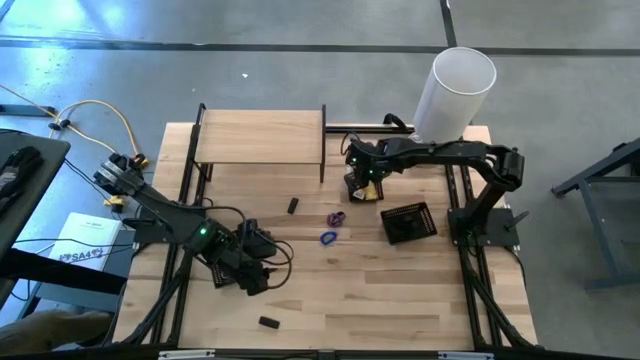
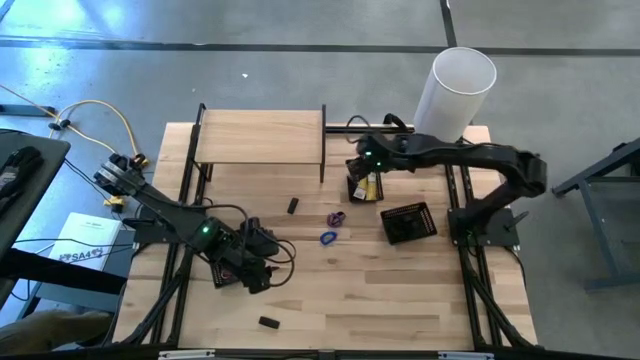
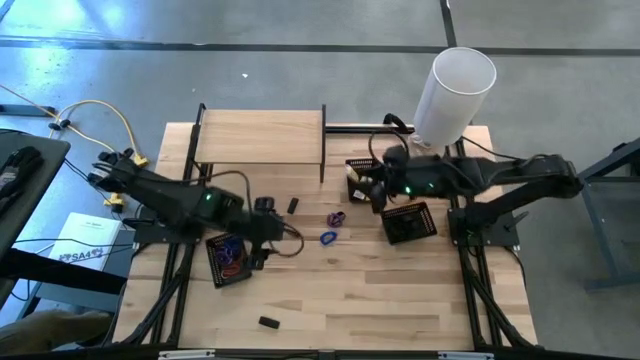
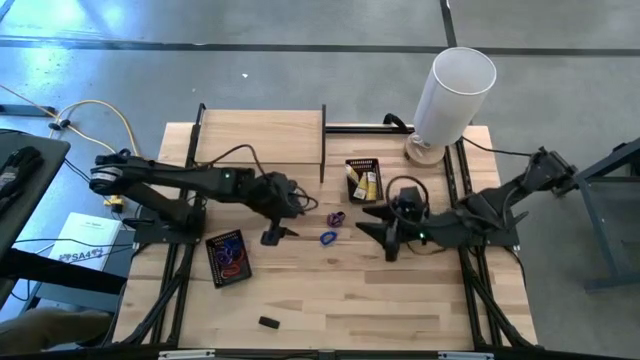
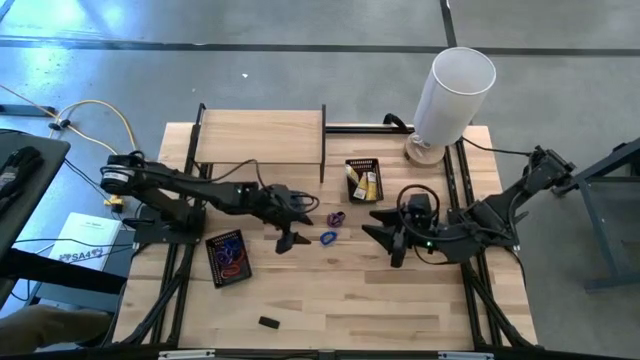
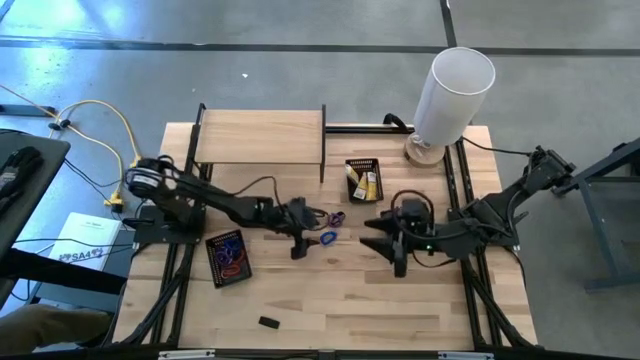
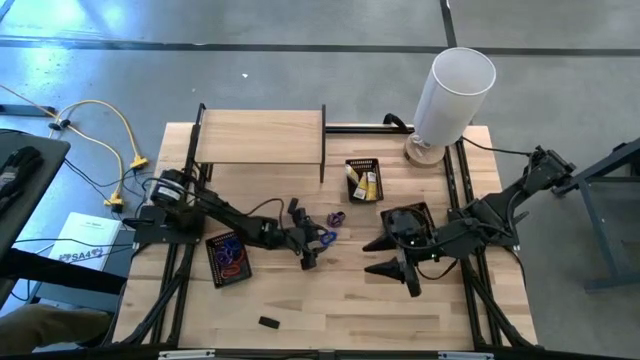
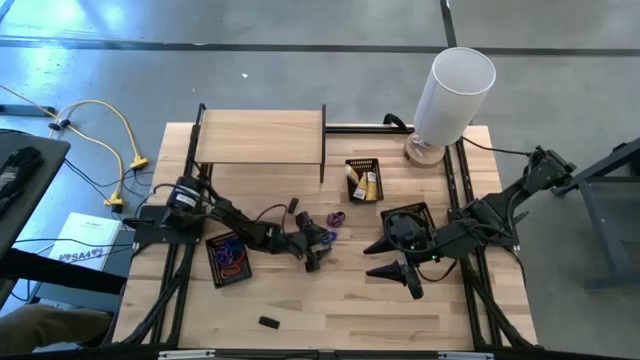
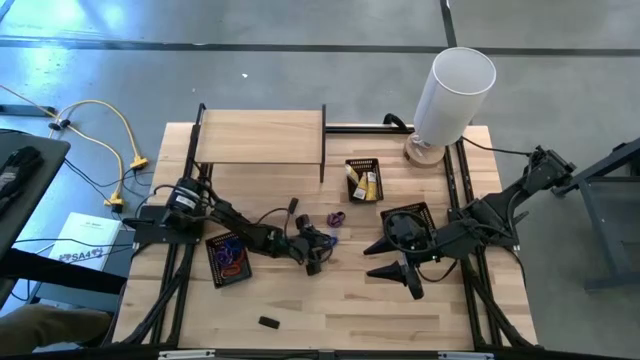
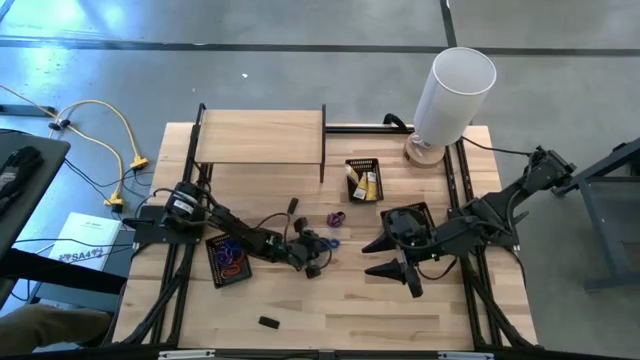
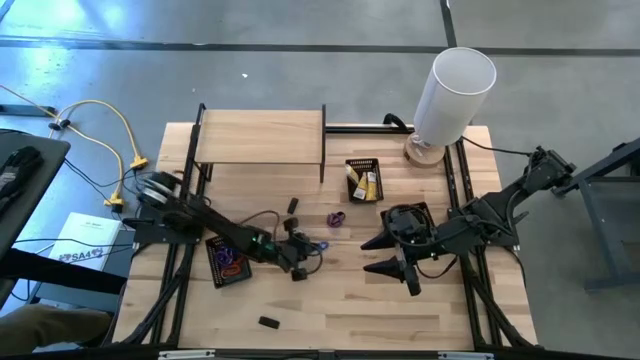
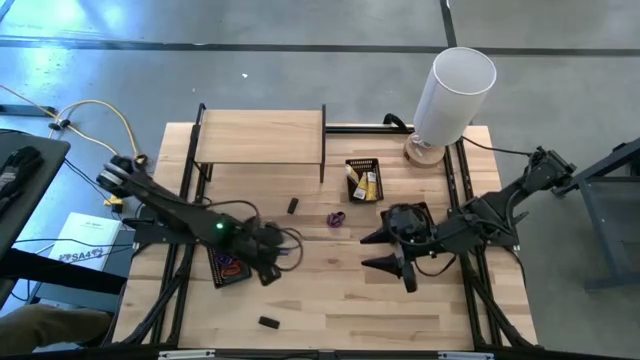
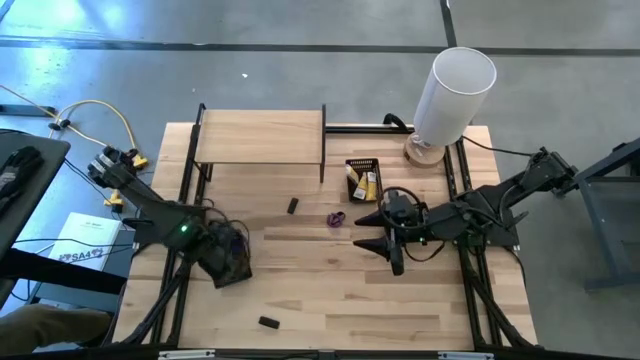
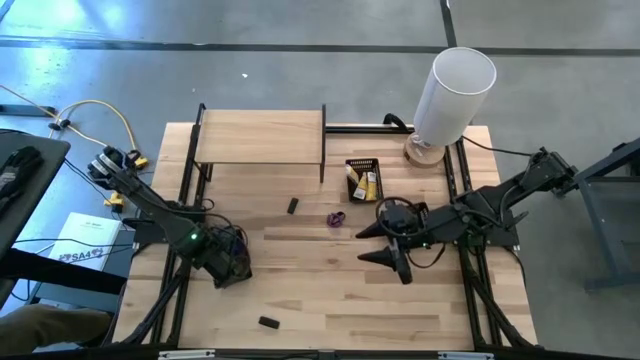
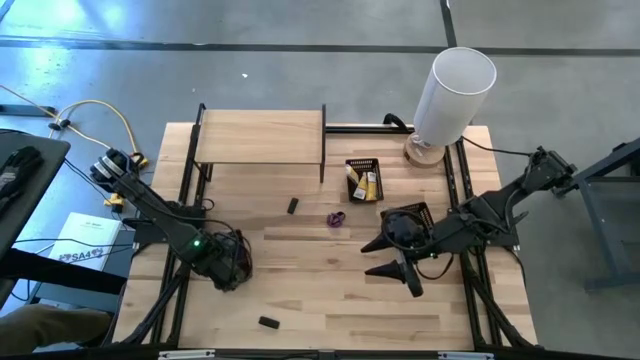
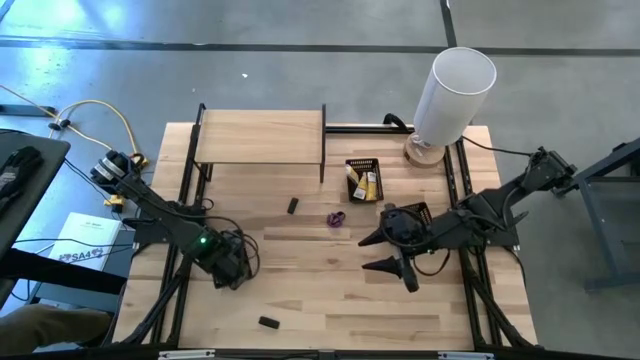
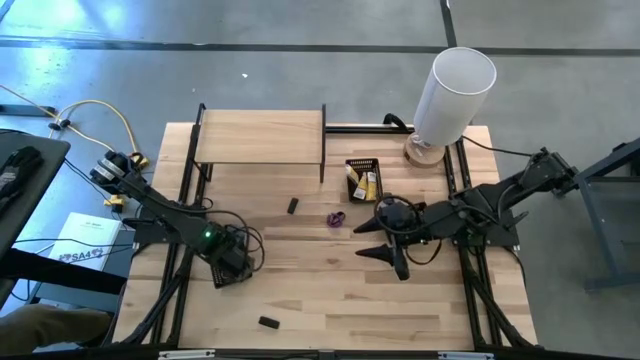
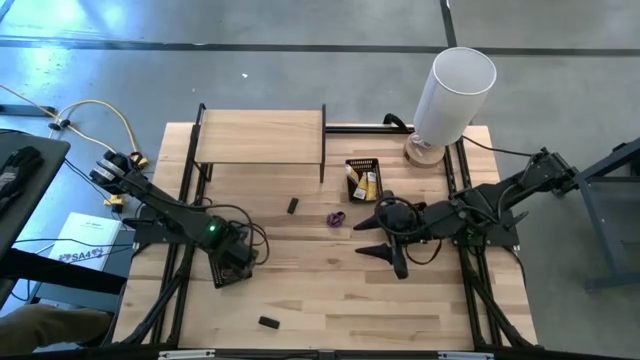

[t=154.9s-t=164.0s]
Task: Pick & Place Office Desk Supplies
Put the blue spring keychain into the bottom left black bin

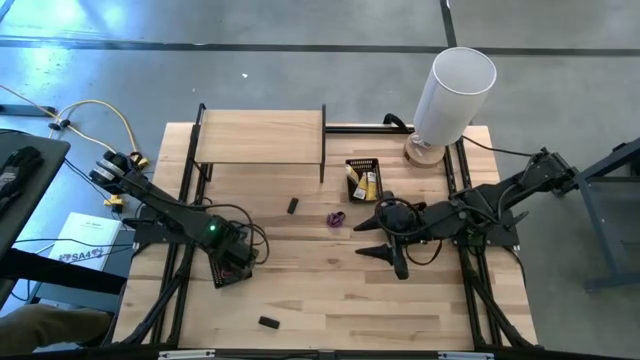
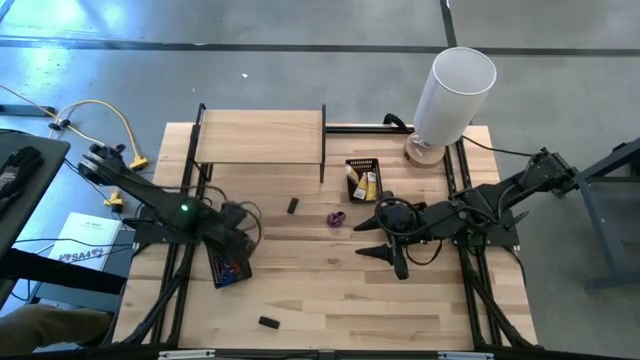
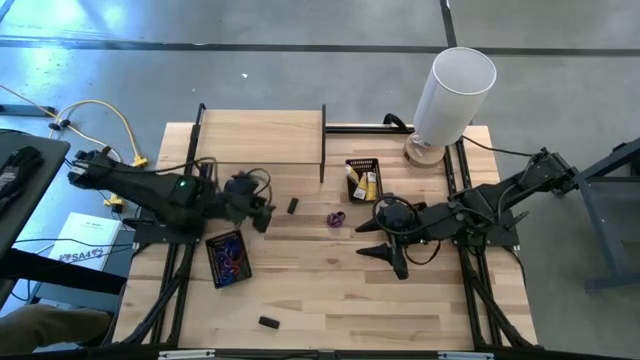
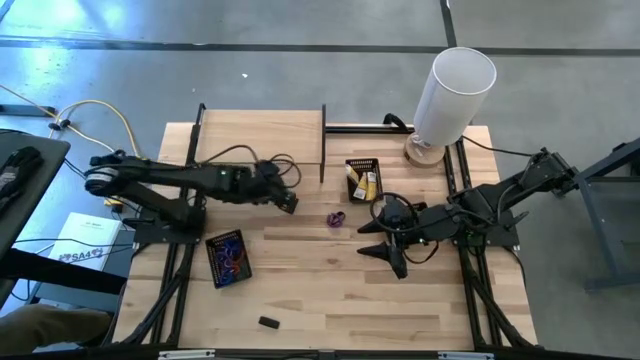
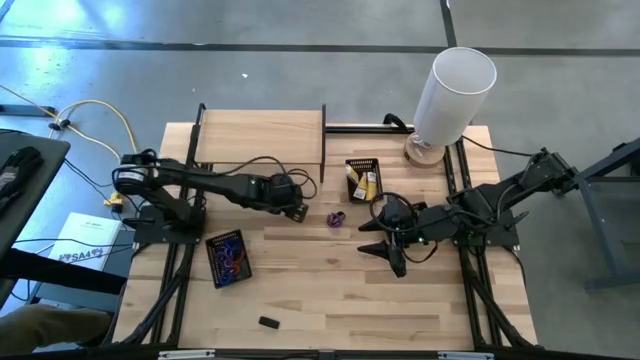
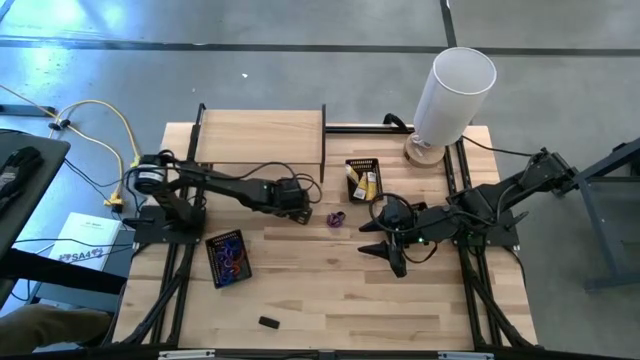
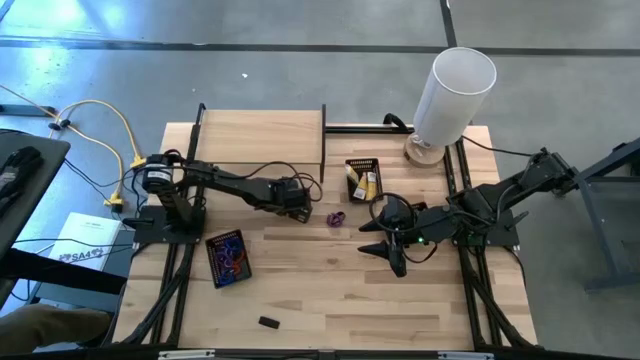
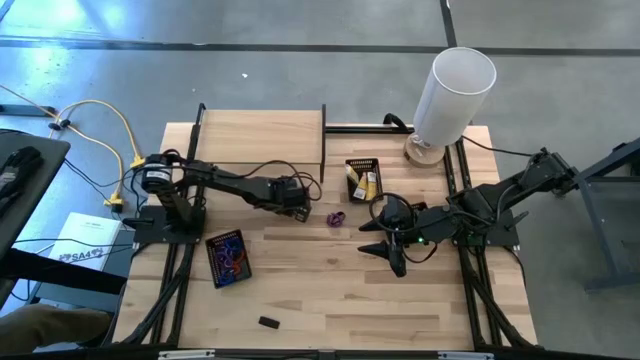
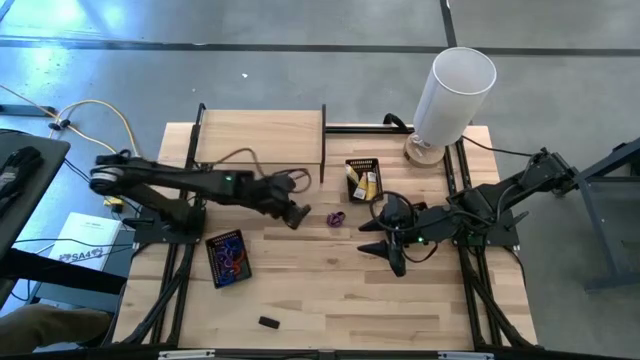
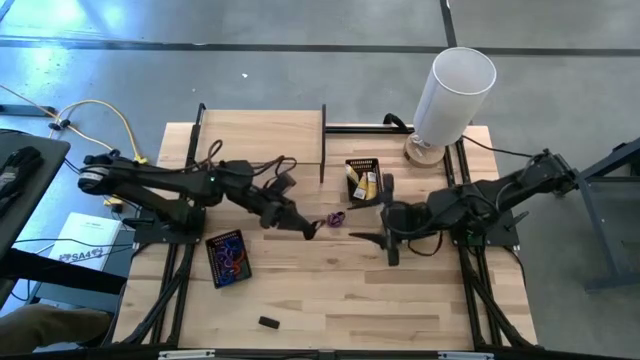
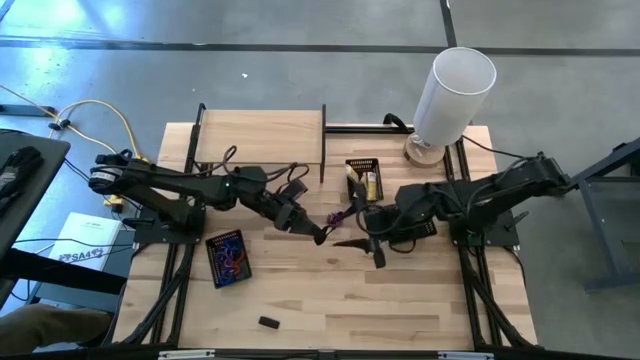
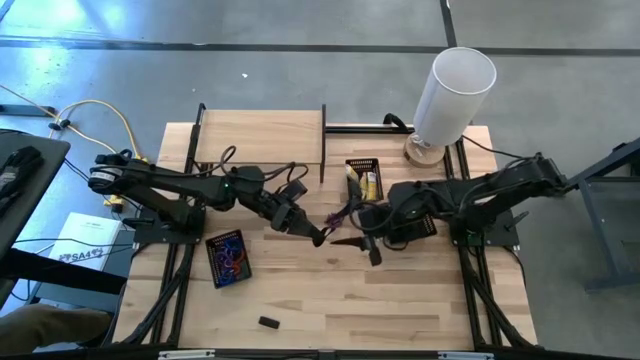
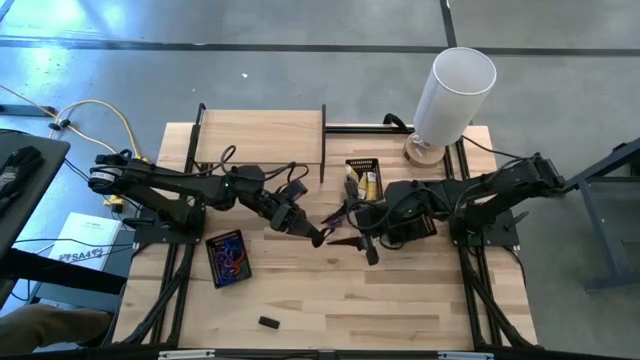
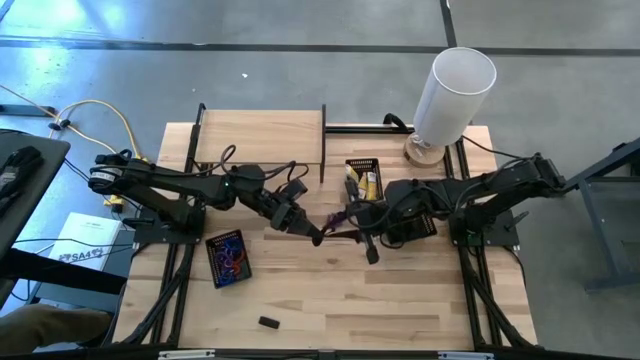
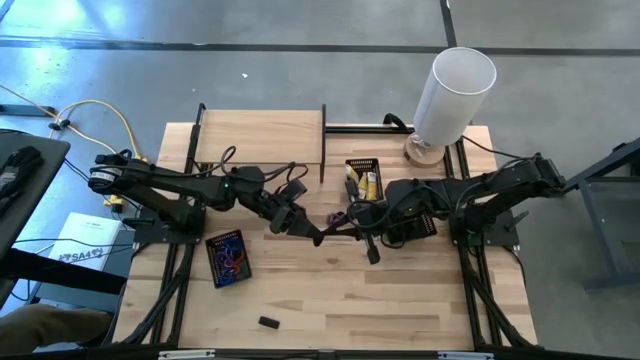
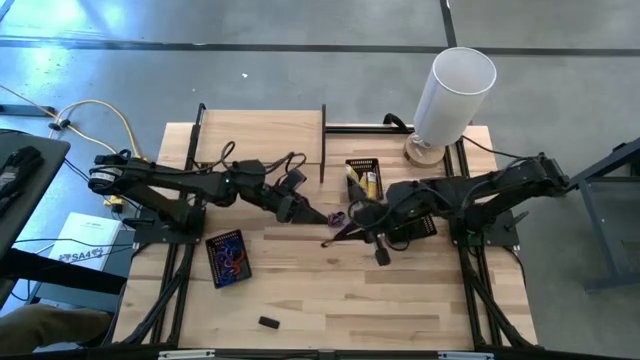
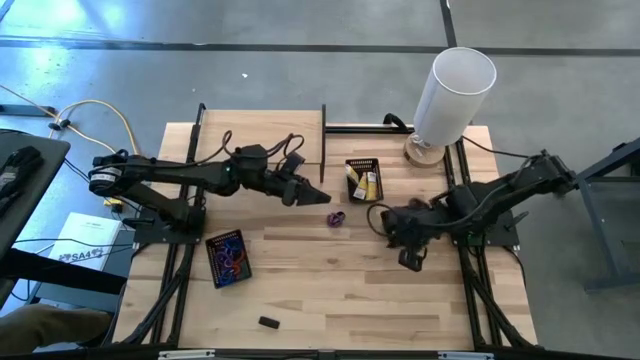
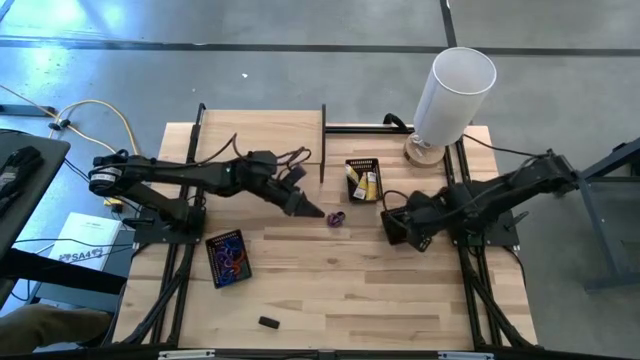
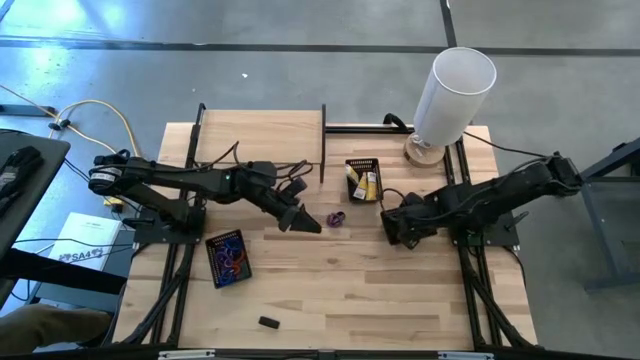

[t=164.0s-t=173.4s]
Put the black rubberband into the bottom right black bin

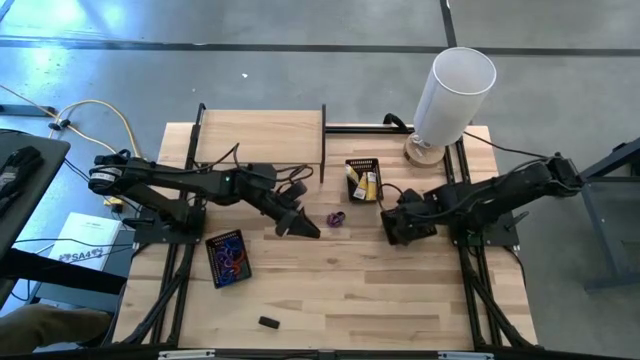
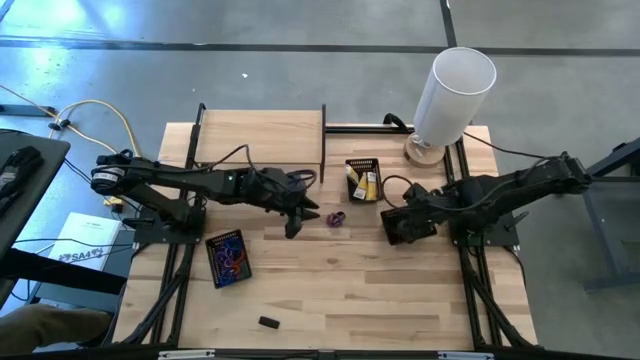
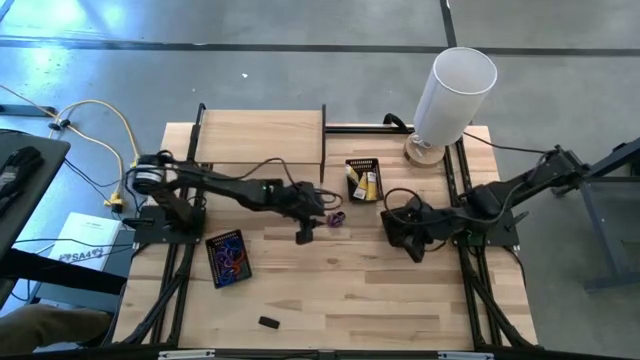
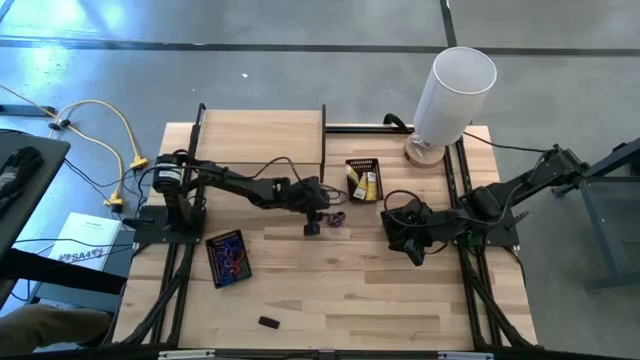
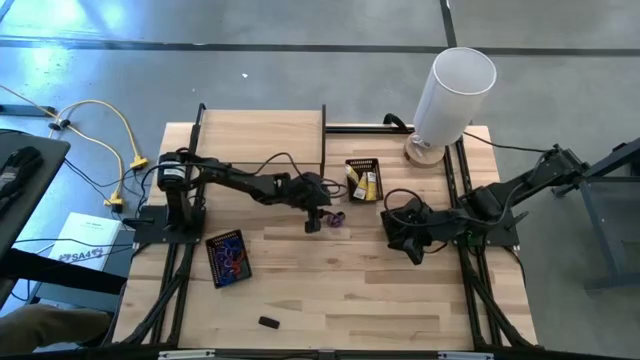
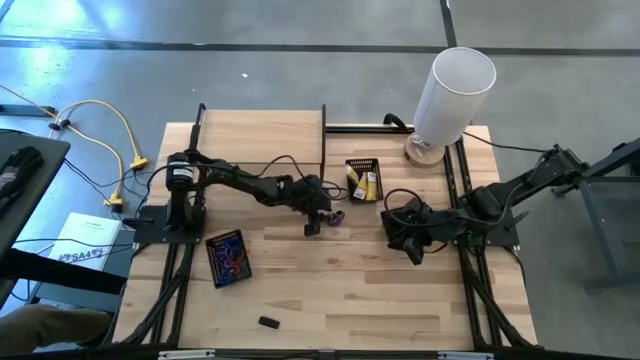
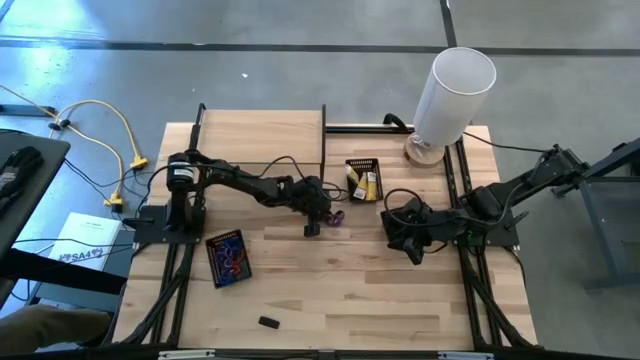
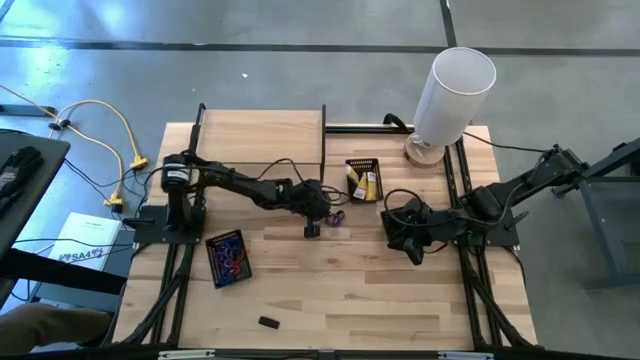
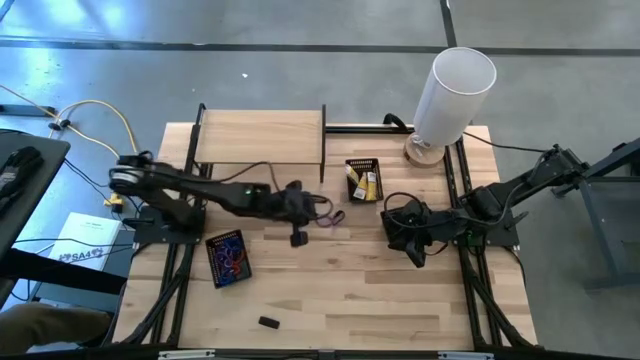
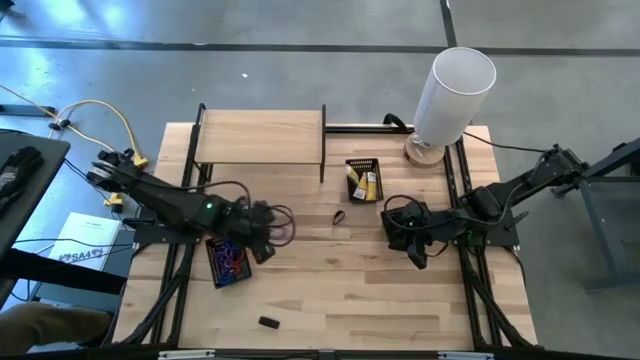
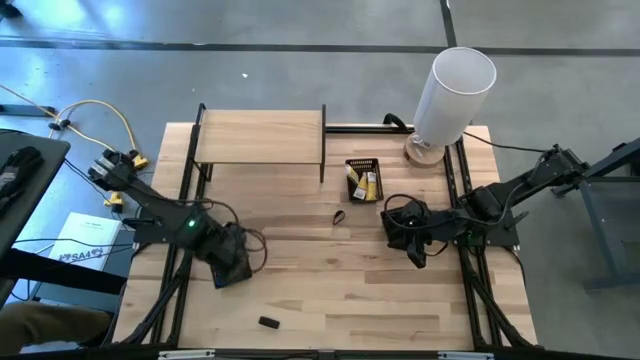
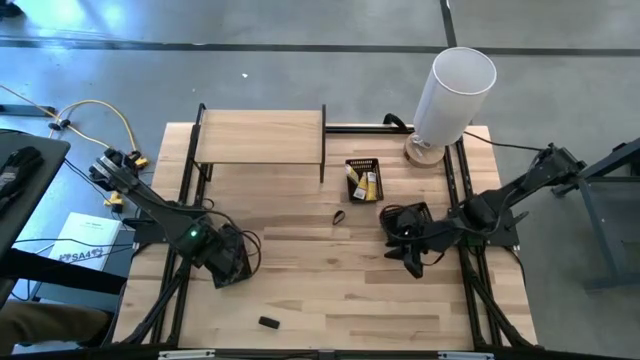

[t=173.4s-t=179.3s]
Put the purple spring keychain into the bottom left black bin
